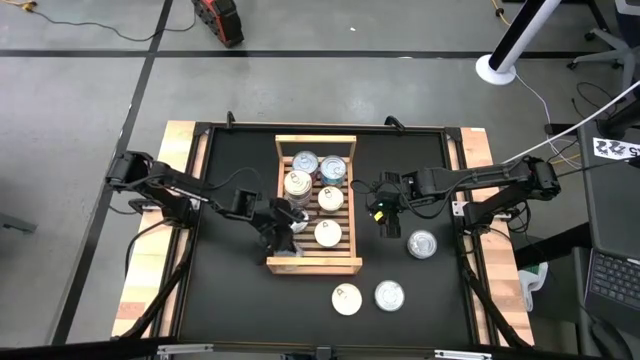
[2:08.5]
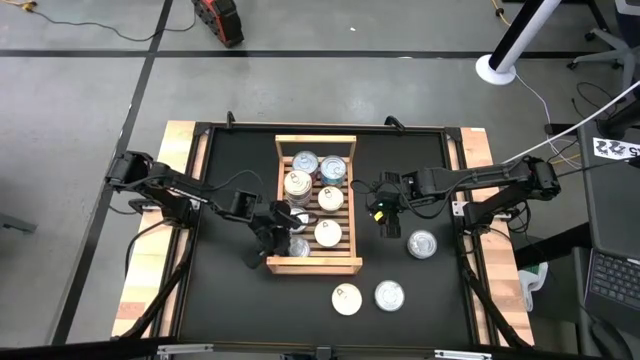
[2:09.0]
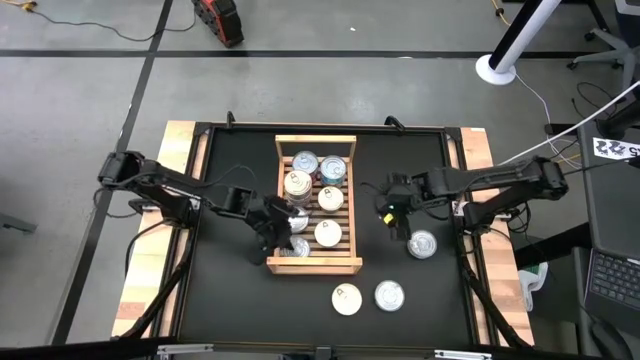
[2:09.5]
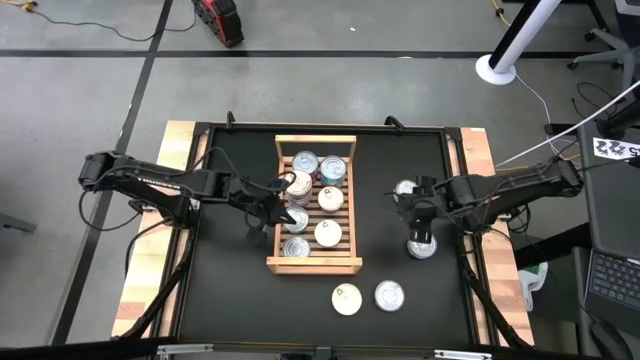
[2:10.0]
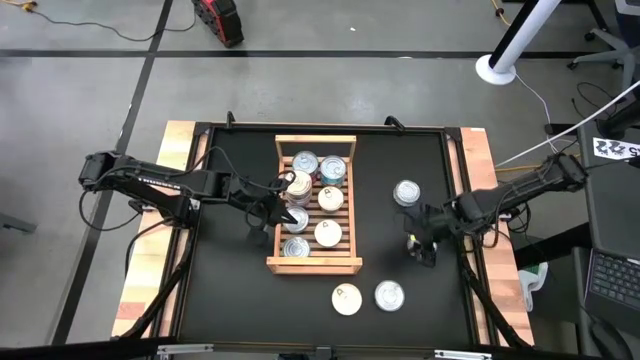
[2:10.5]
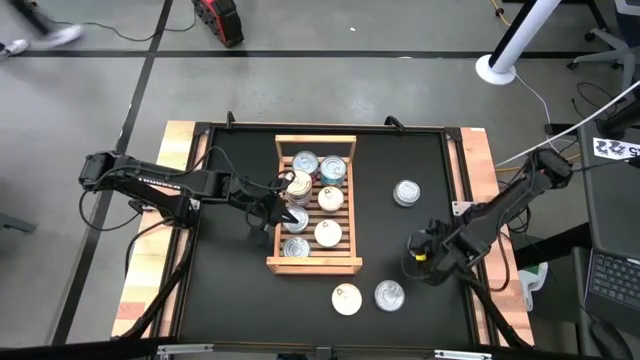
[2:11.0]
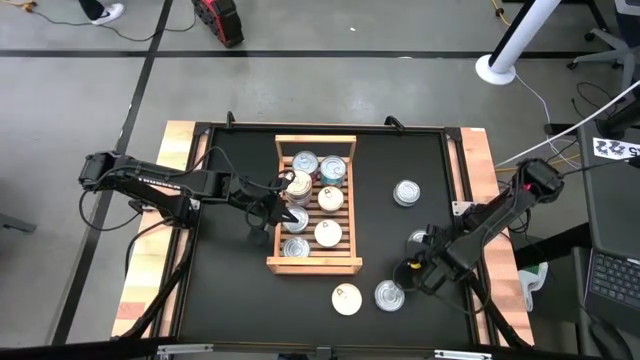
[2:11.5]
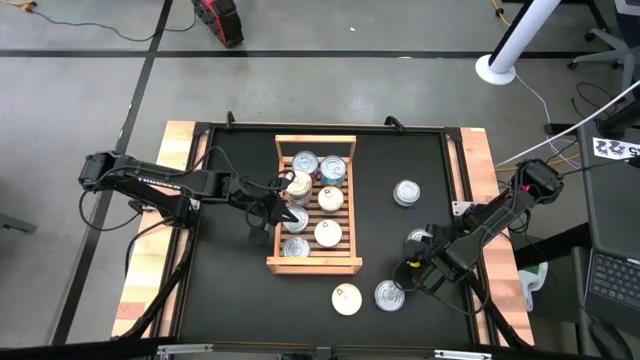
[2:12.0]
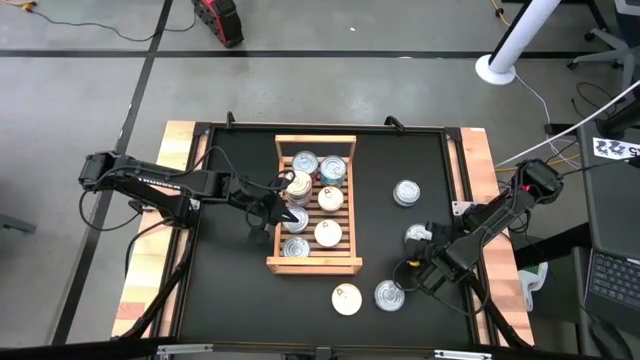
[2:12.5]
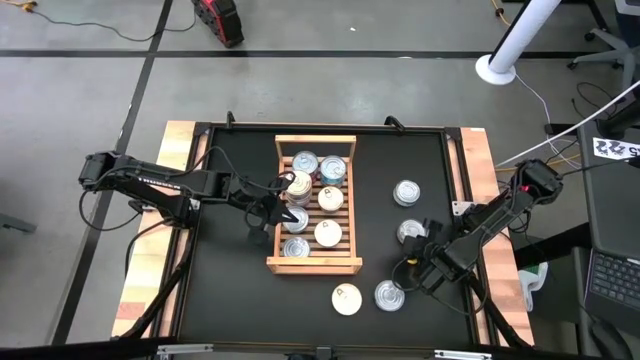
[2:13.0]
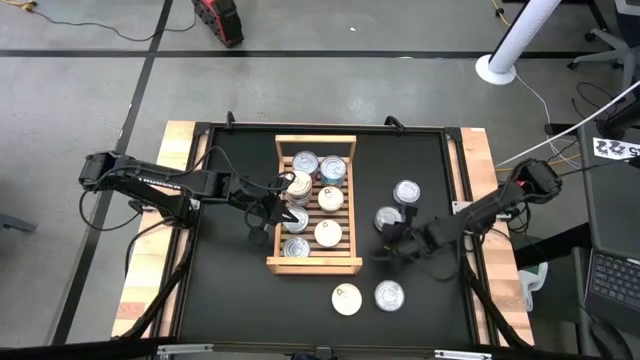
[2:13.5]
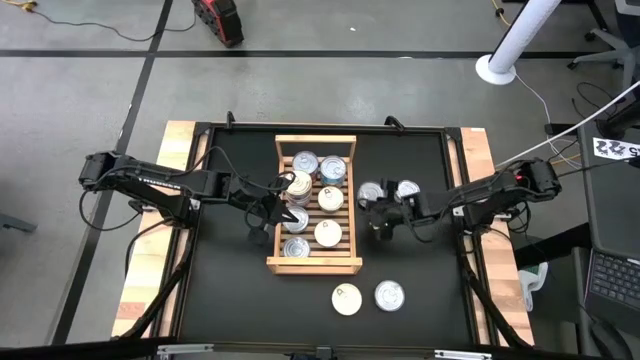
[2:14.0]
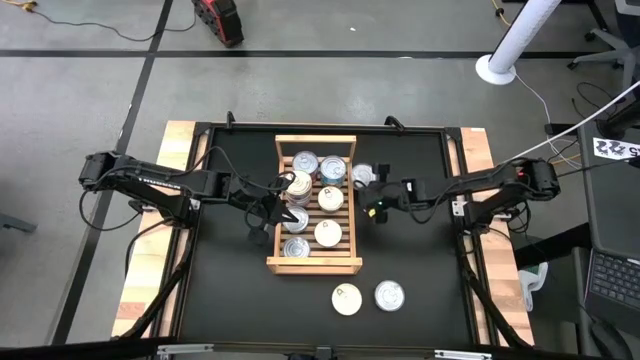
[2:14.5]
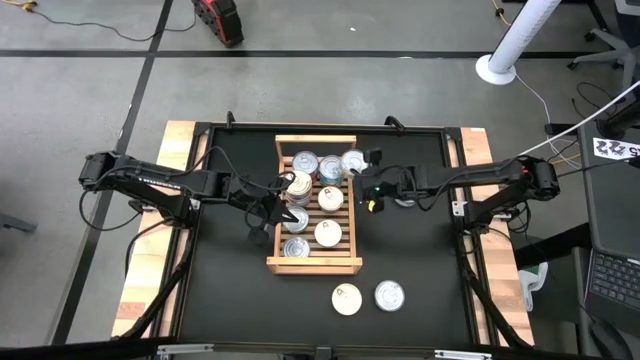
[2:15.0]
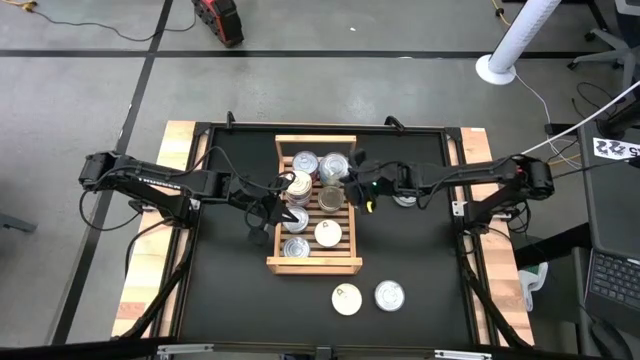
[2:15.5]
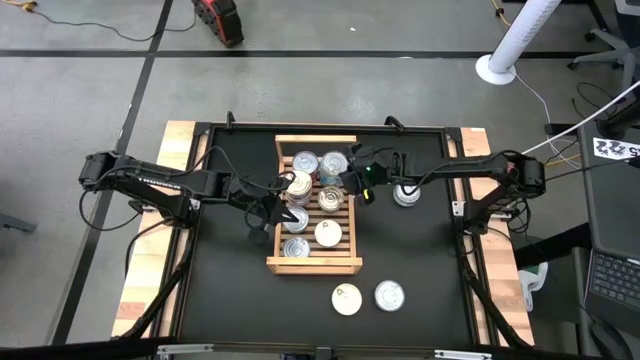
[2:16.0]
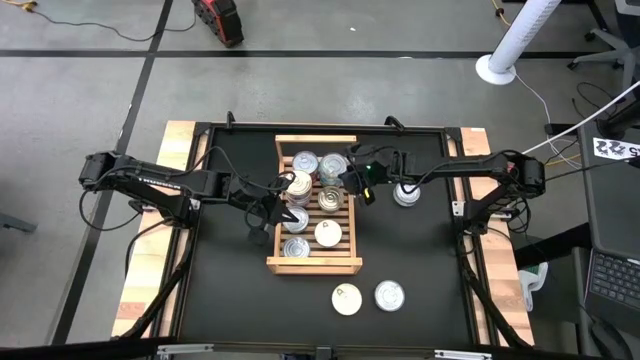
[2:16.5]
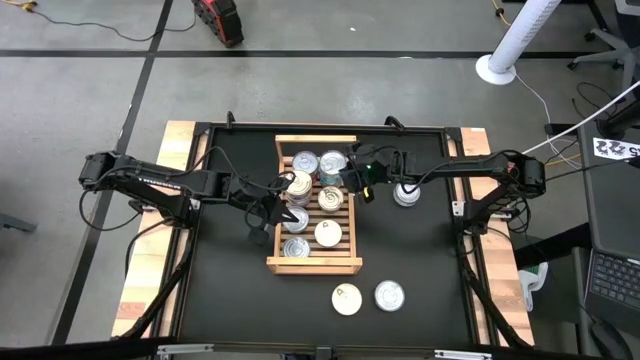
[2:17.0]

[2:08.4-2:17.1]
Task: Stack canned seafood by type on shelf
Stack the yellow-blue tuna can on top of the other yellow-blue tuna cans on the shelf

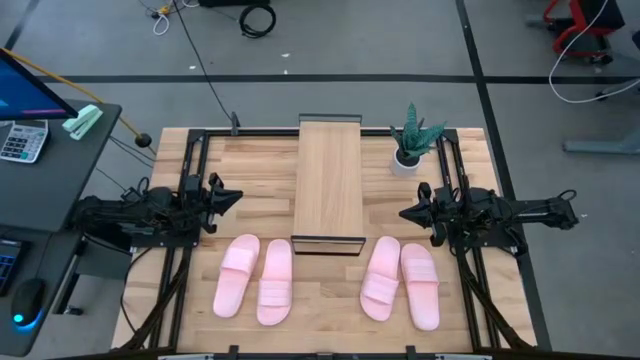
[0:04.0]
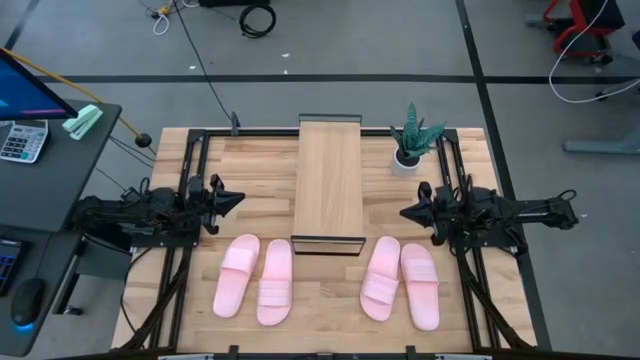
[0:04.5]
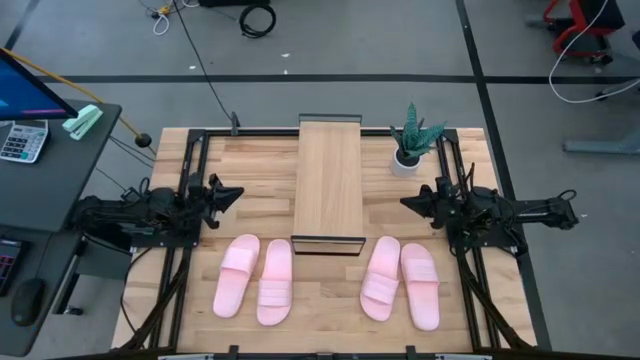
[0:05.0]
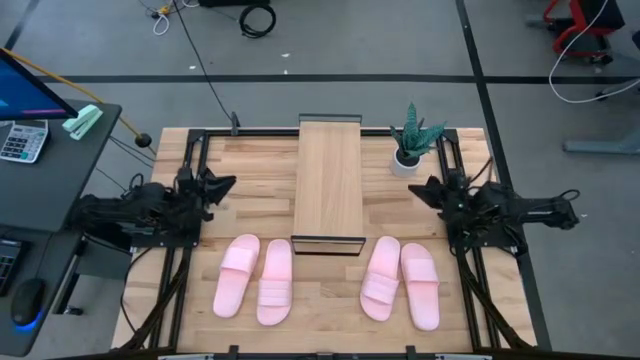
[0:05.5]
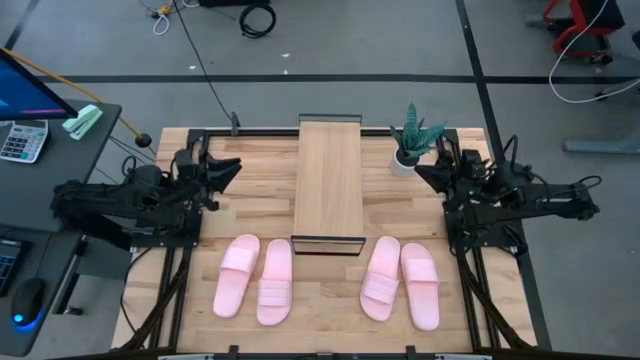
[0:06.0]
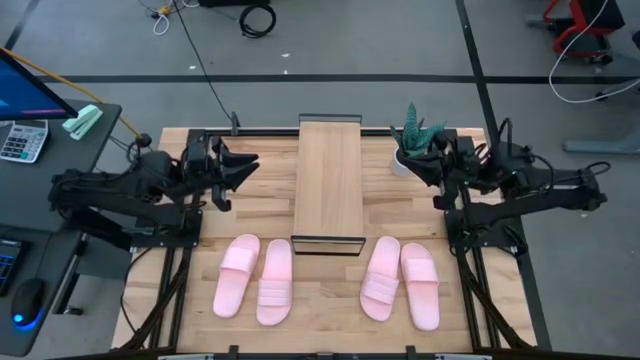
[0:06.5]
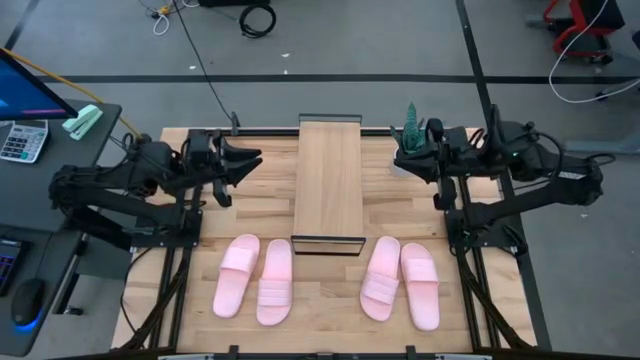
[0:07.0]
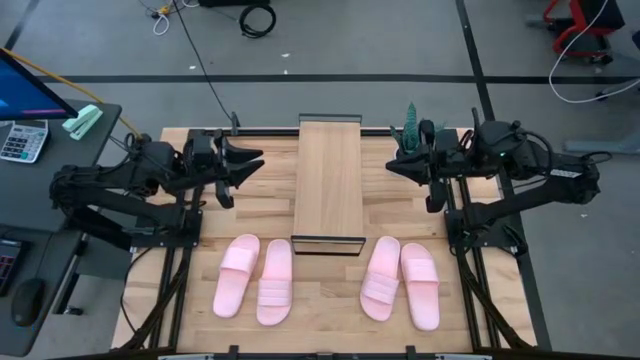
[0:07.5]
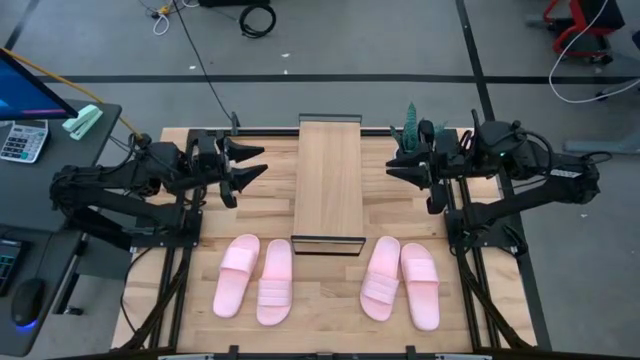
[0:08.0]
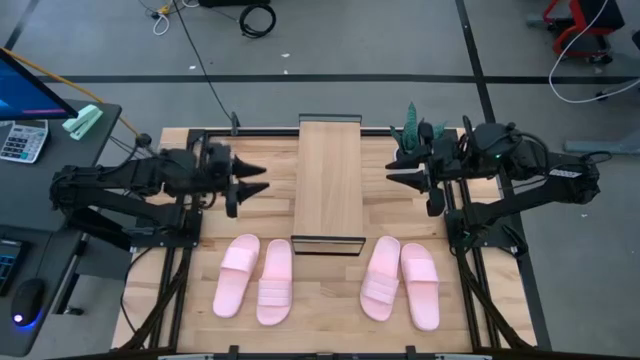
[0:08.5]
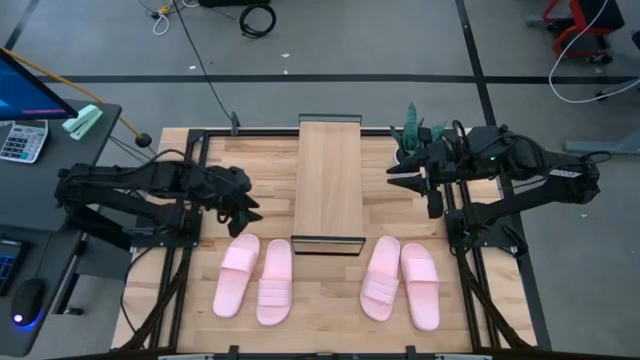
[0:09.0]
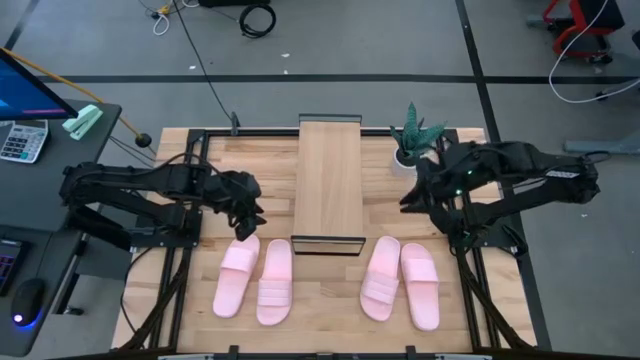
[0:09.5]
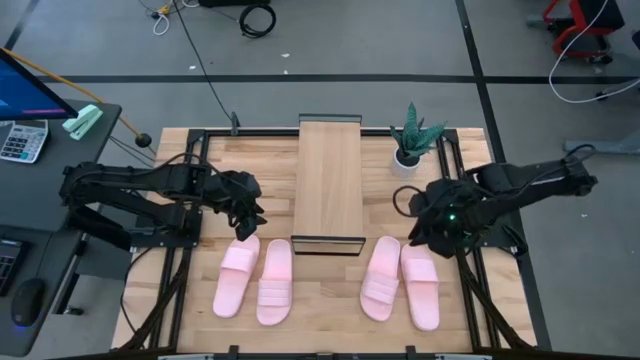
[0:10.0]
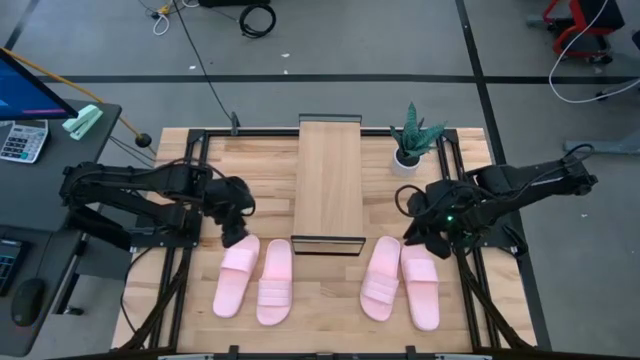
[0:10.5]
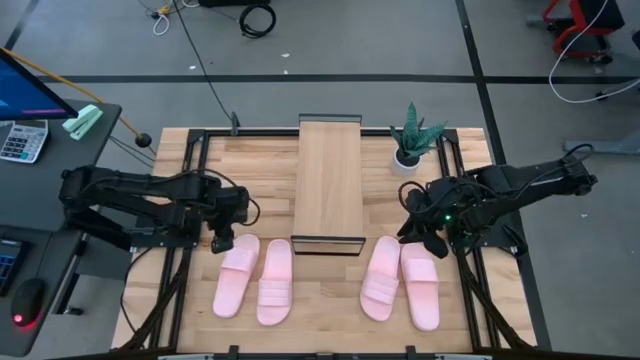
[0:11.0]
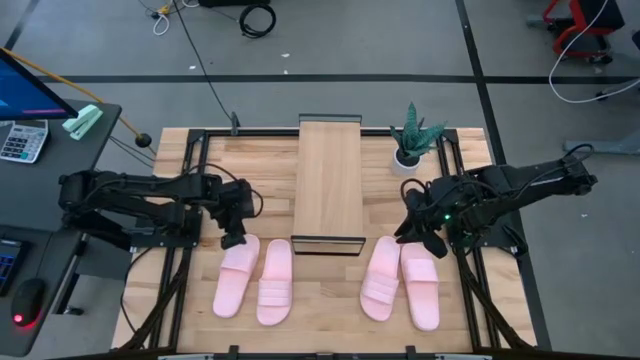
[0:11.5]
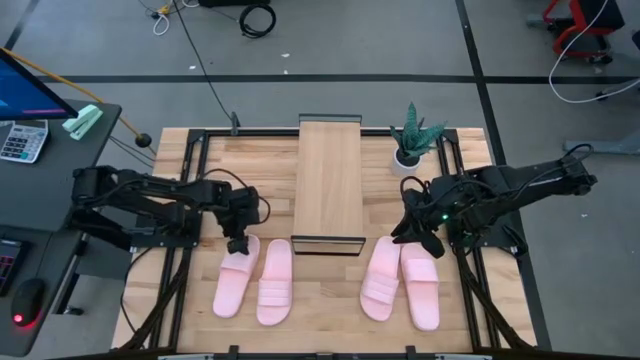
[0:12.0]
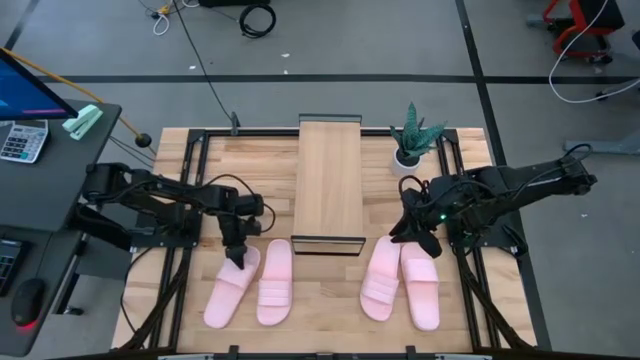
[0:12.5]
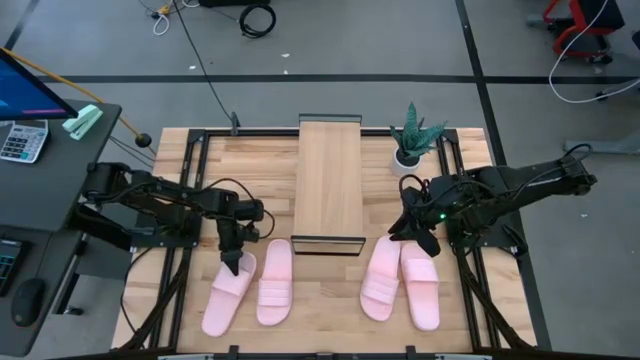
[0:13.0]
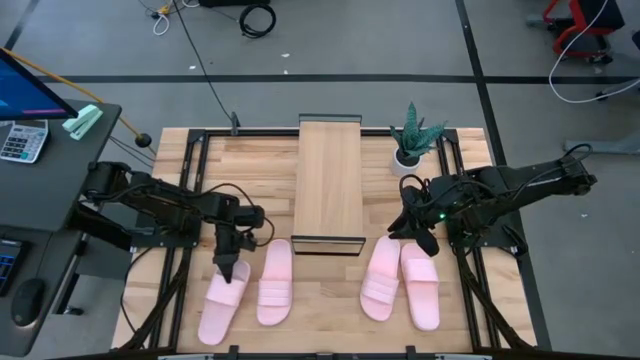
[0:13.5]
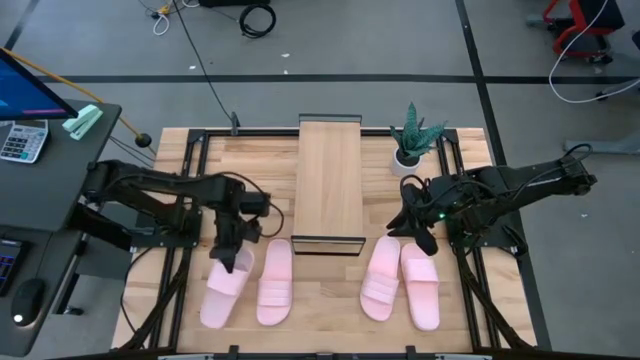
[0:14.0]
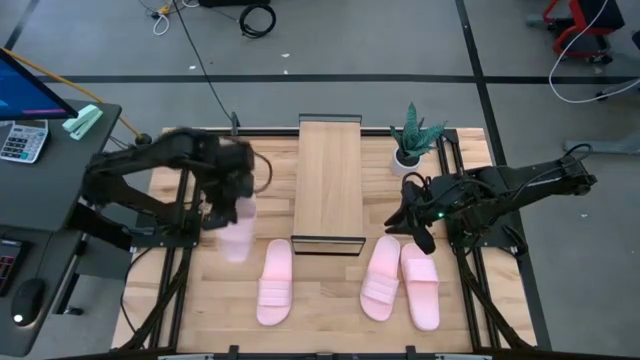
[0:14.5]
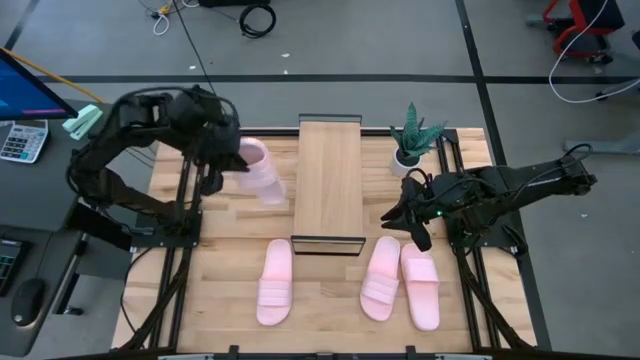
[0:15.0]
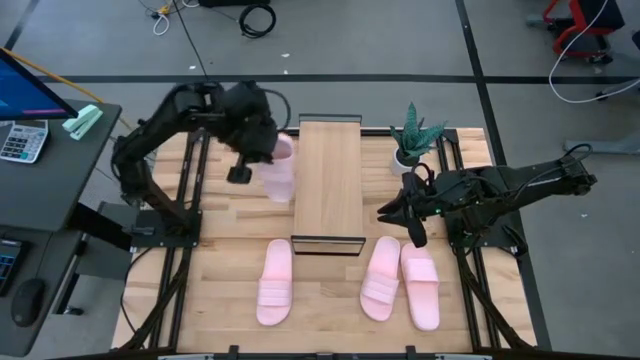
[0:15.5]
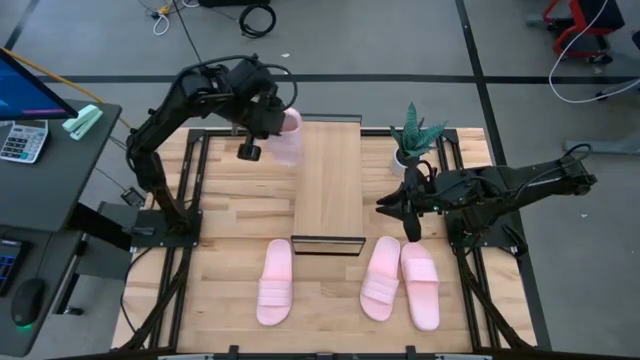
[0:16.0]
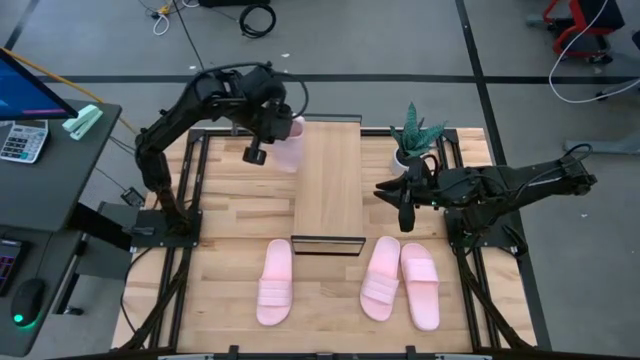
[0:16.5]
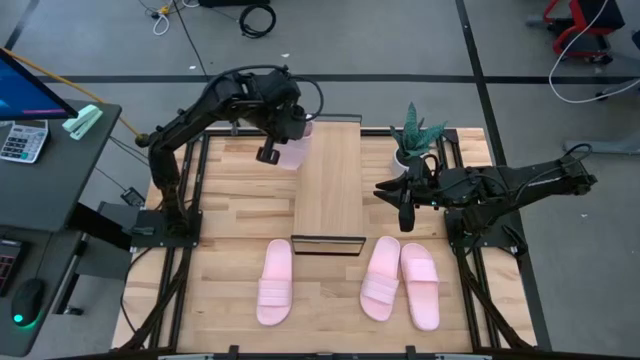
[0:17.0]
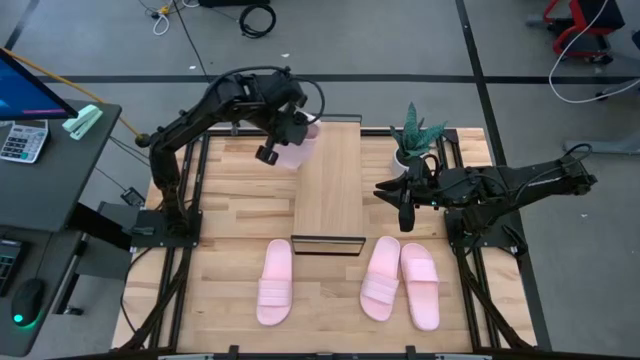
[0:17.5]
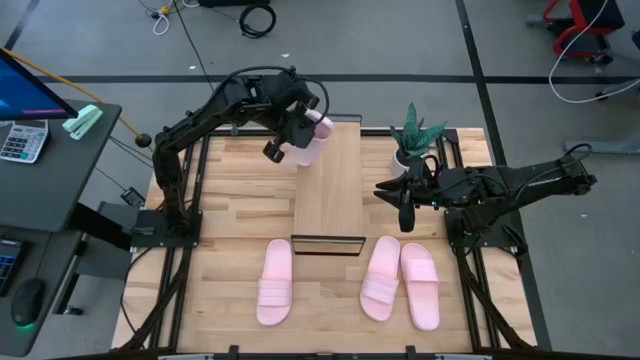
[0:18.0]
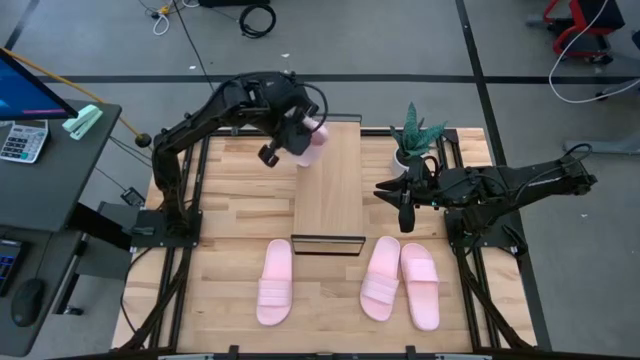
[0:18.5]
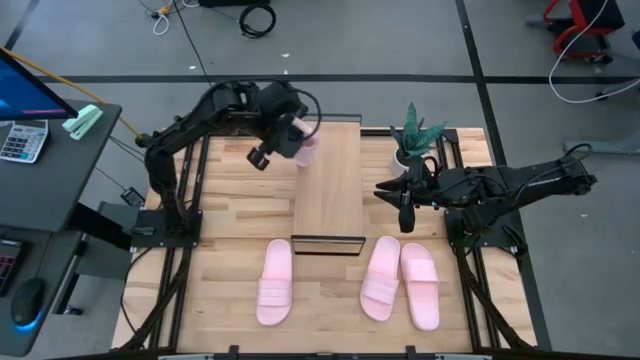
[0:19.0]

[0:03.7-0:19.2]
Task: Pick and place slides into the shelf
Put the pink slide on the shelf
